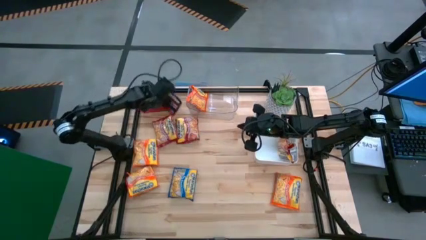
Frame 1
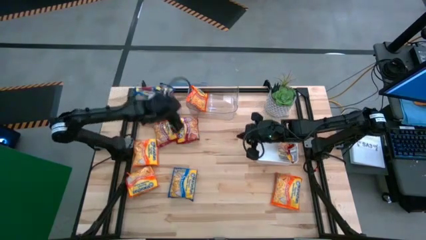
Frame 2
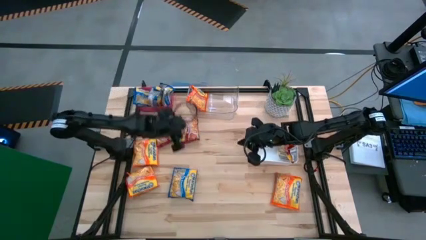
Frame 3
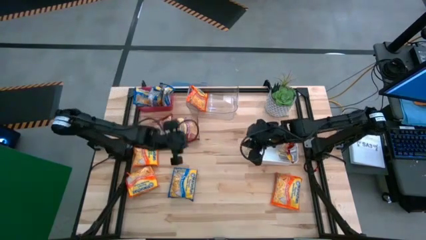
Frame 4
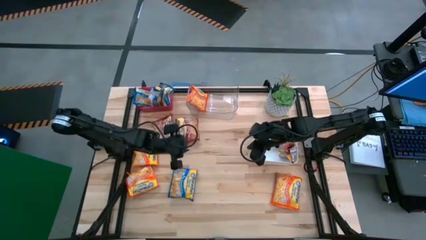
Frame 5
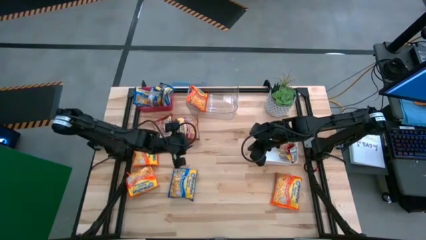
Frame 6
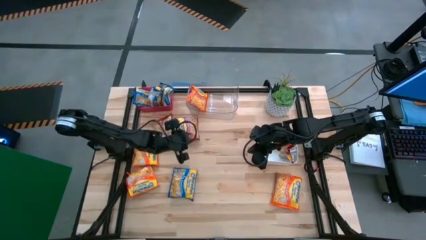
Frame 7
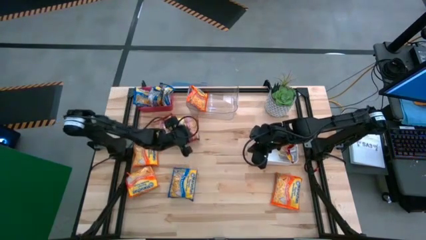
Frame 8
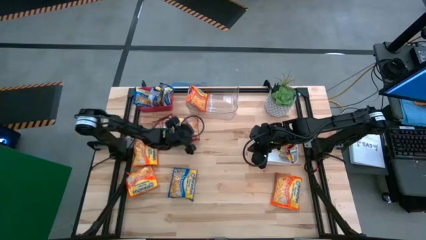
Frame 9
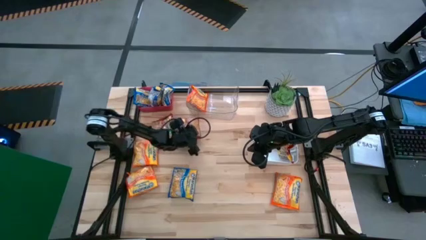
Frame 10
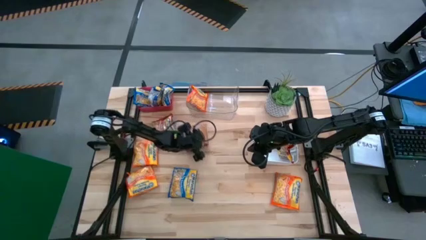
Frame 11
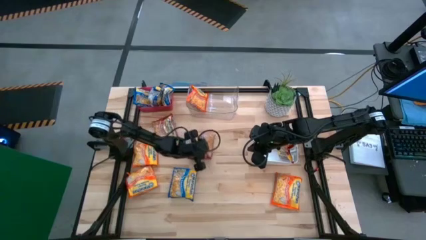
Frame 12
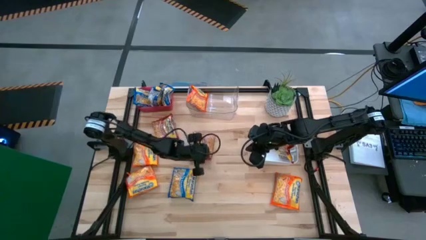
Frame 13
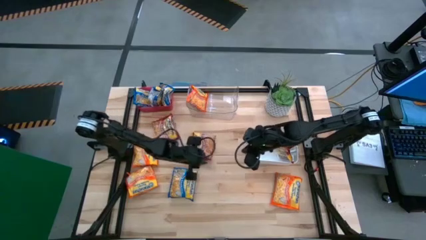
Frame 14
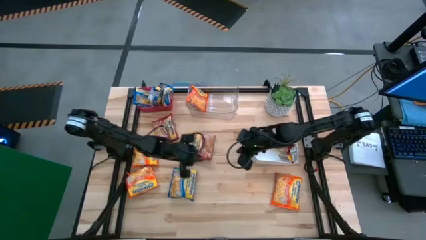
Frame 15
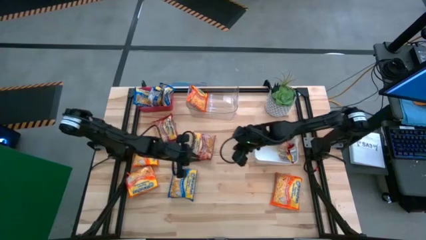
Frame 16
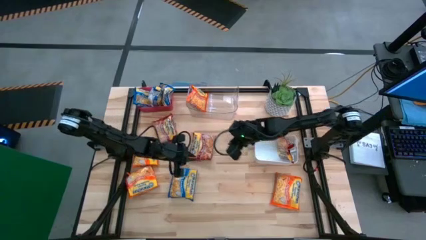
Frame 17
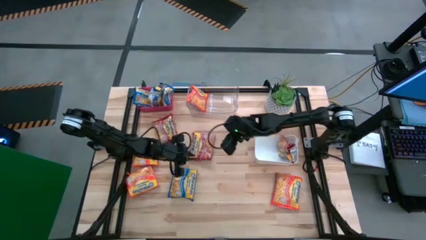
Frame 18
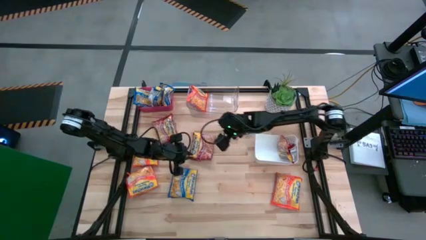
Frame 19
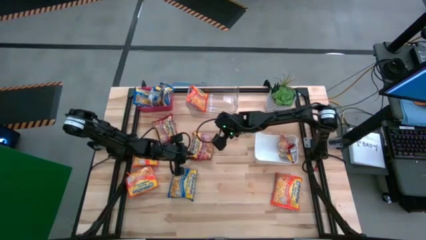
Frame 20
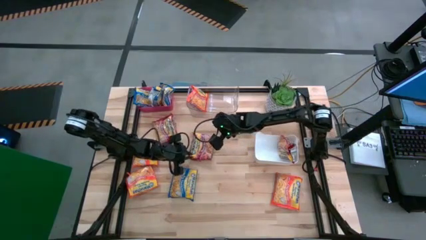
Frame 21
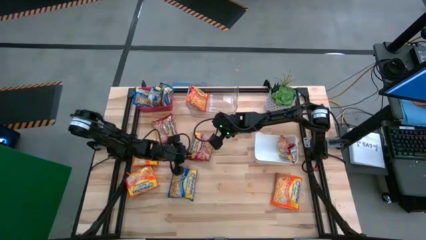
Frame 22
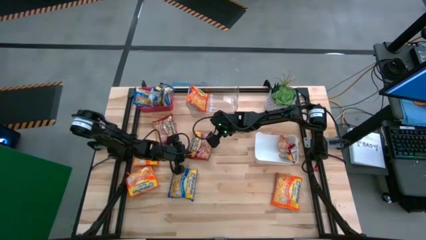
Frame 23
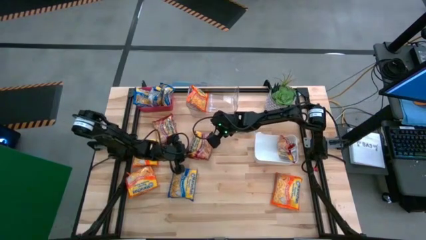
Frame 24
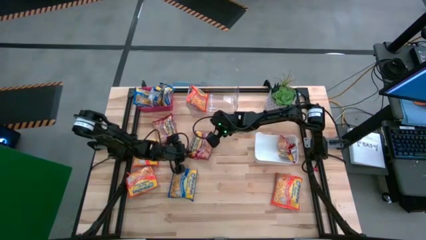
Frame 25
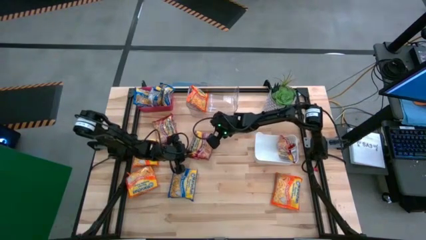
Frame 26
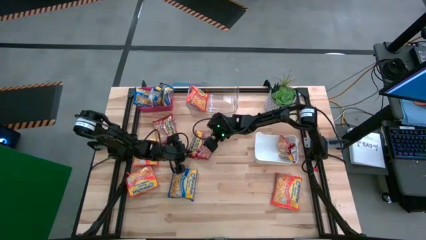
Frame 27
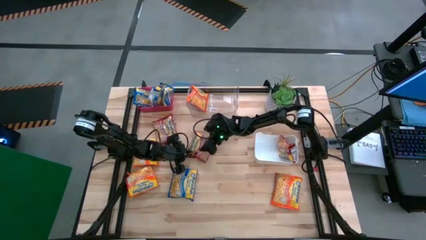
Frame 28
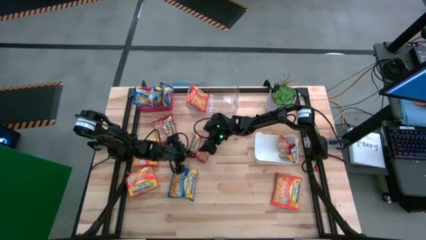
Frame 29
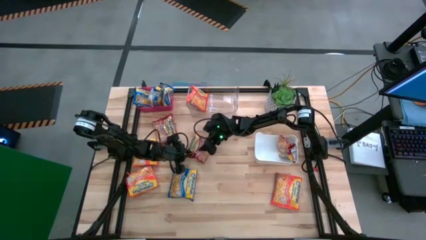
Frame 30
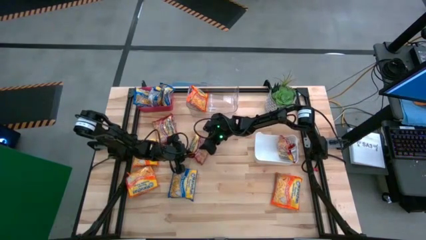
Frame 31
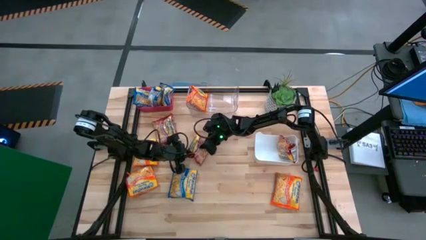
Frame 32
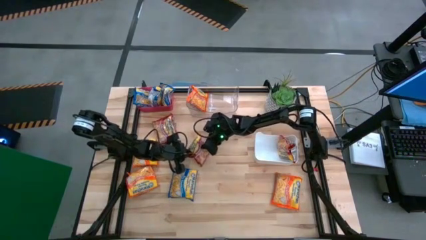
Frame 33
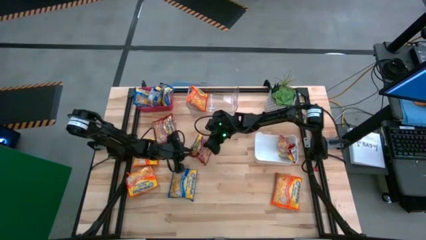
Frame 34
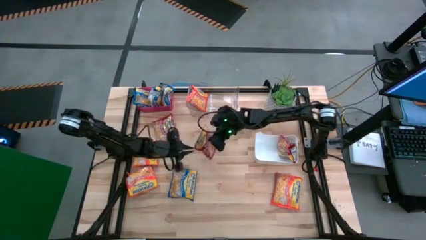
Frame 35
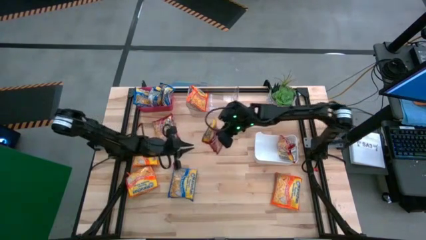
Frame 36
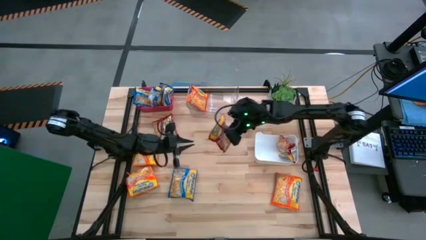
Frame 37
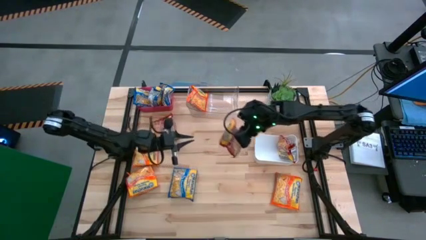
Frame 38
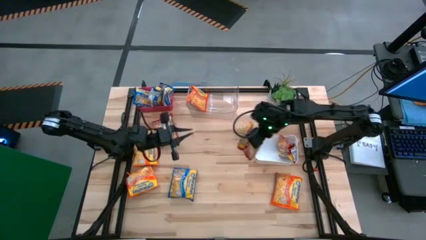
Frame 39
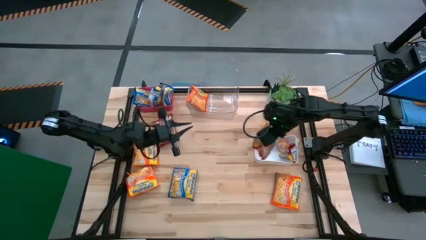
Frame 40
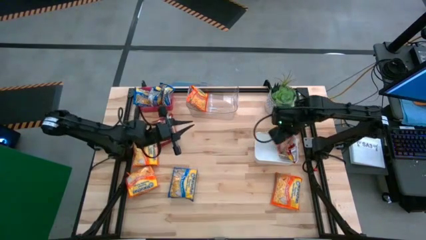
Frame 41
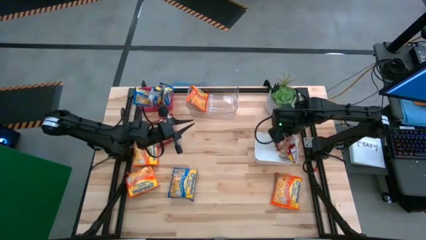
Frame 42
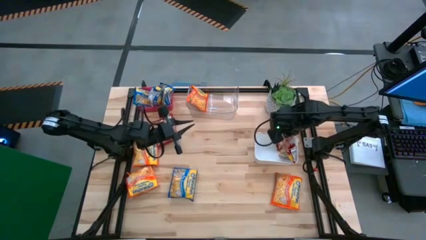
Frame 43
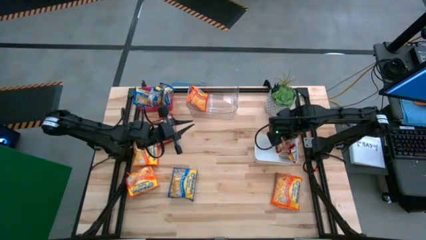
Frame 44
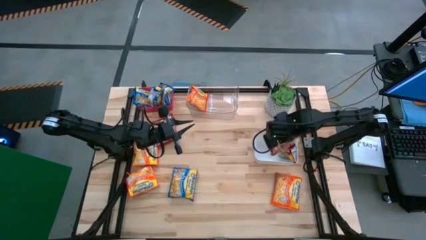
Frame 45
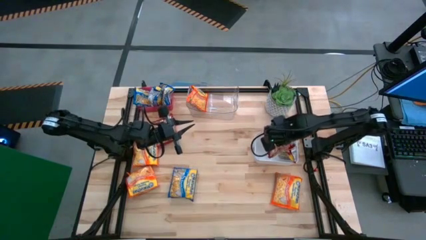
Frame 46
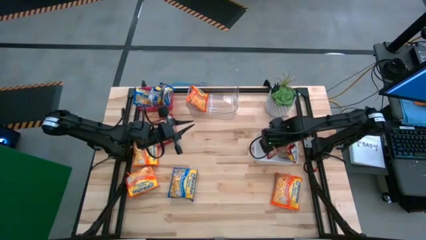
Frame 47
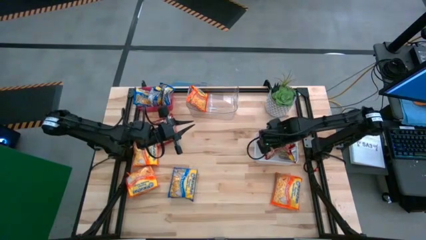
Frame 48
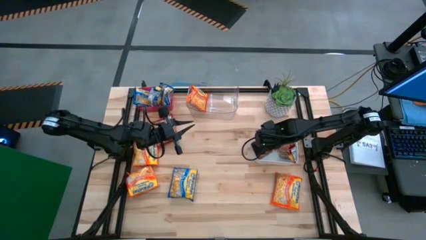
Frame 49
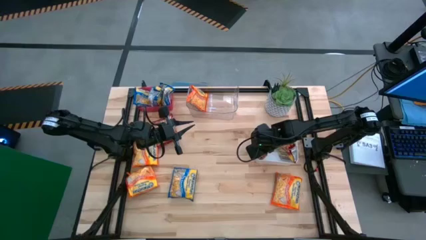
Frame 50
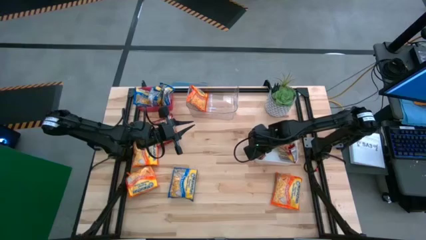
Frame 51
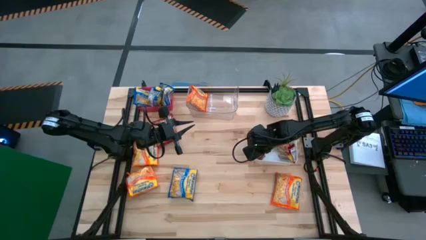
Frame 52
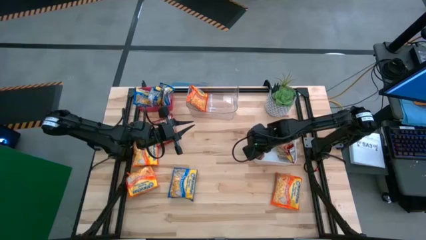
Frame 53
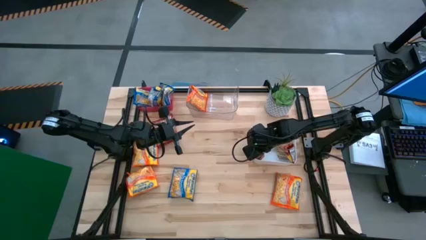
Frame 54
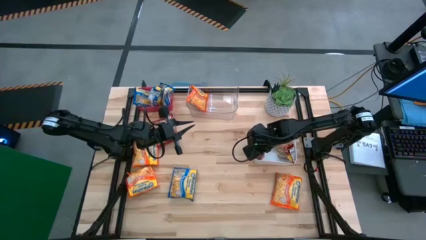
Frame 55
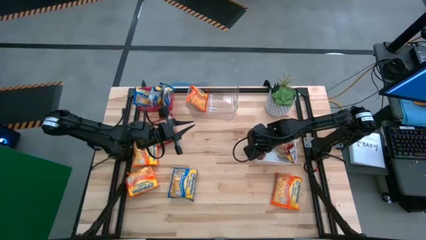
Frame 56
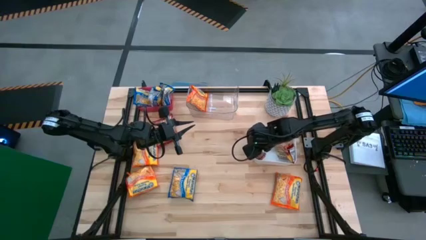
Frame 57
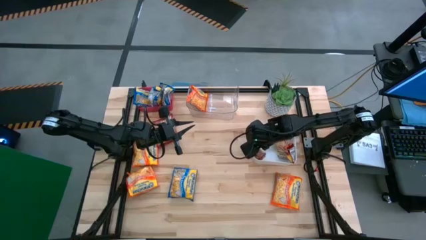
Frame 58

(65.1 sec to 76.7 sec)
Task: Sort Maruchan noodles
Put the red noodle pack into the white bin
